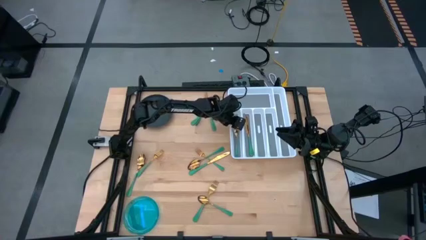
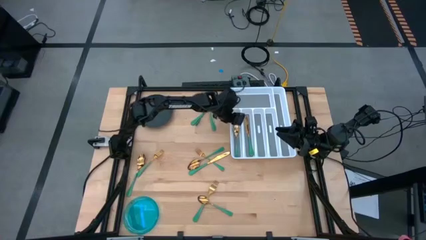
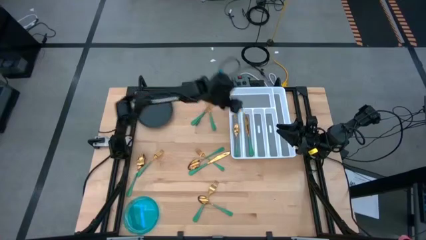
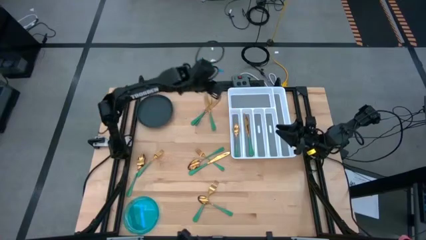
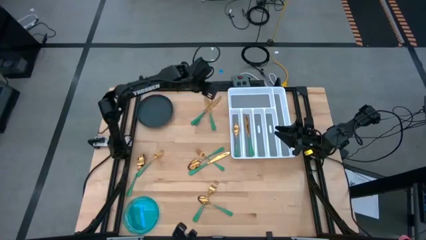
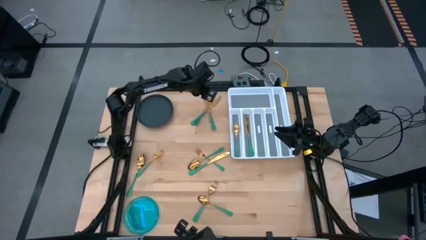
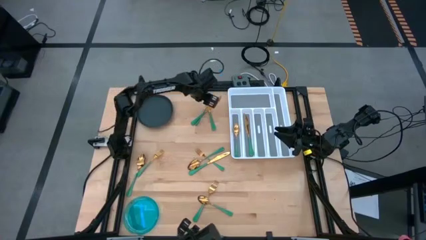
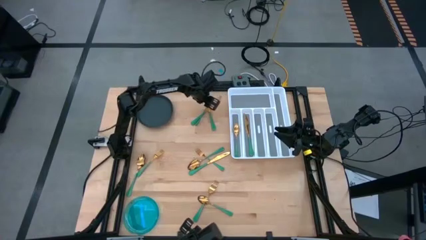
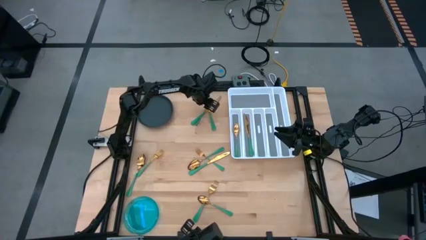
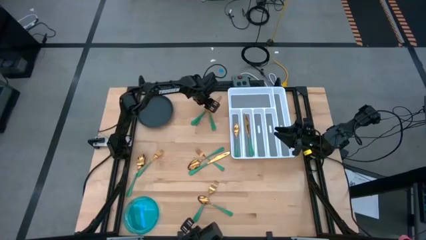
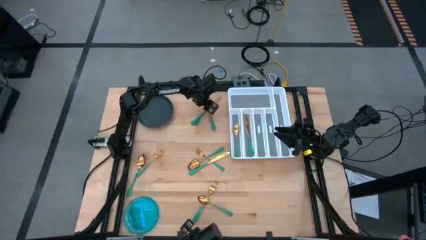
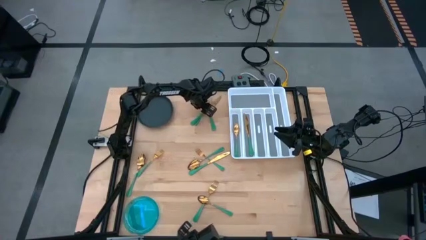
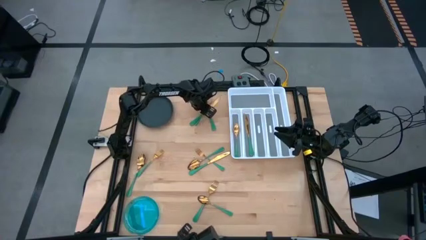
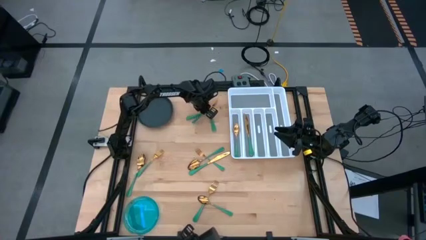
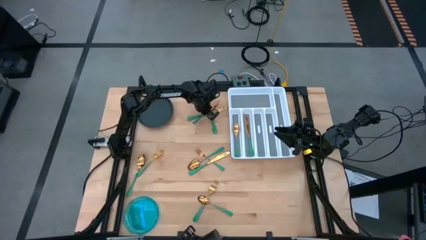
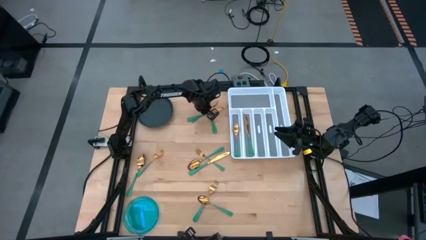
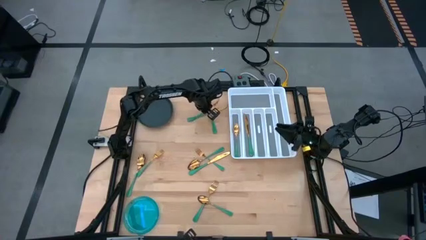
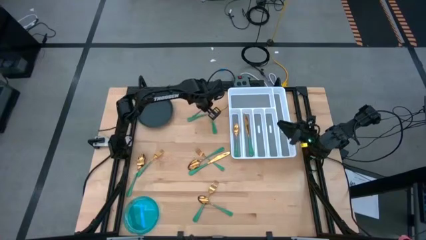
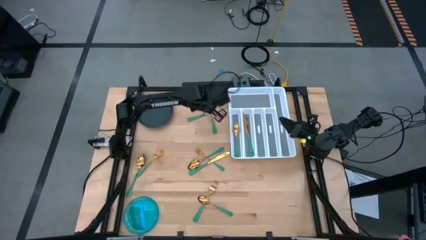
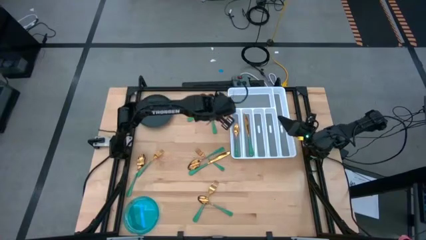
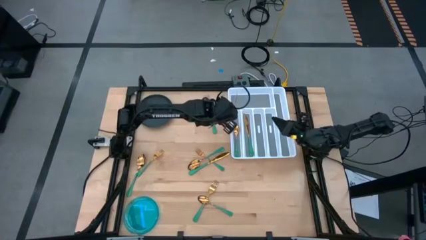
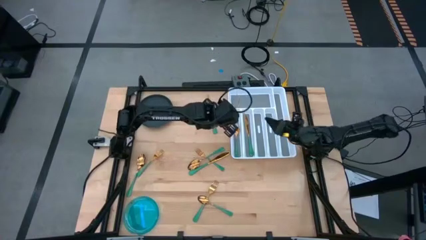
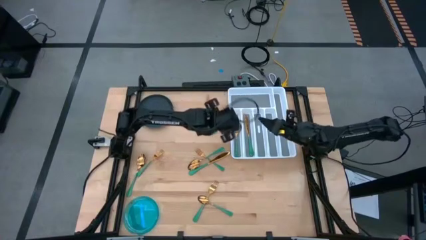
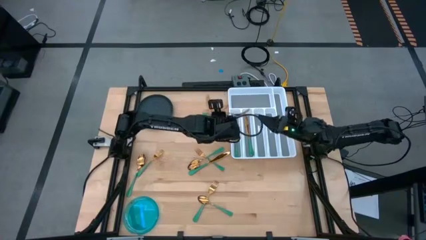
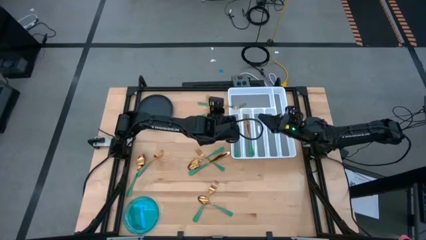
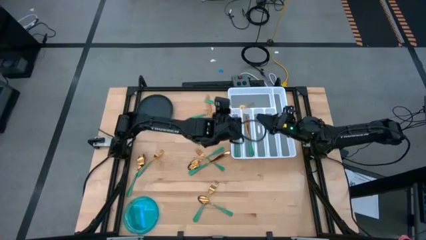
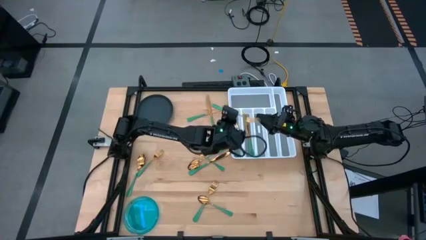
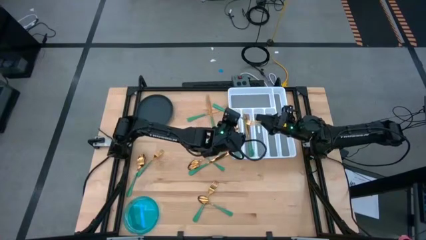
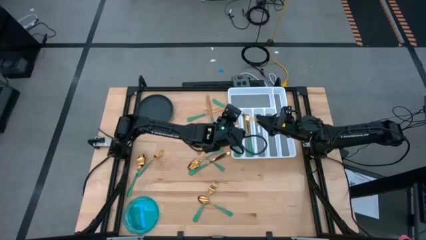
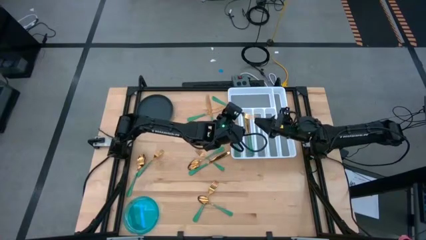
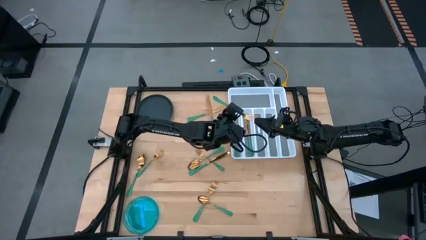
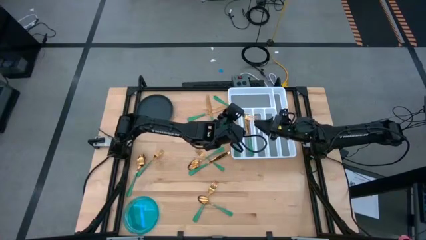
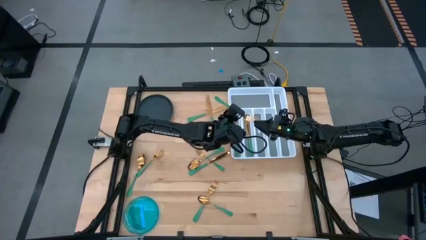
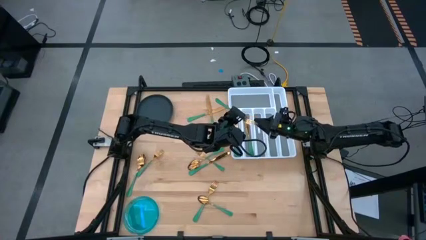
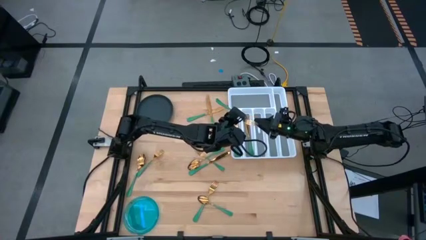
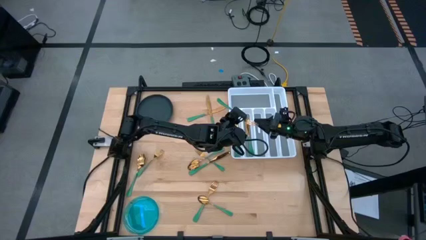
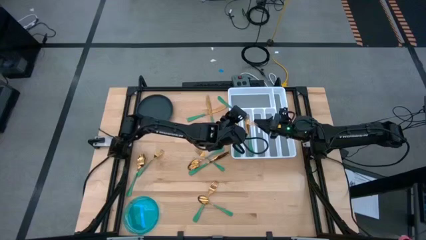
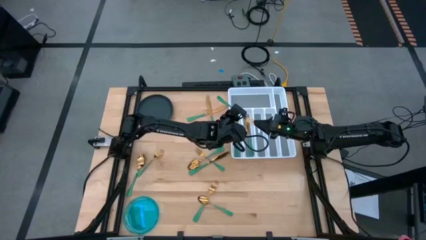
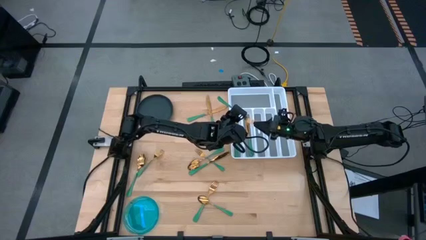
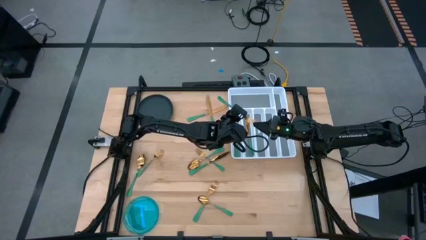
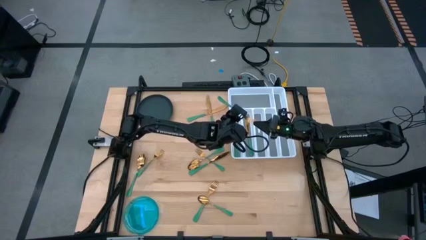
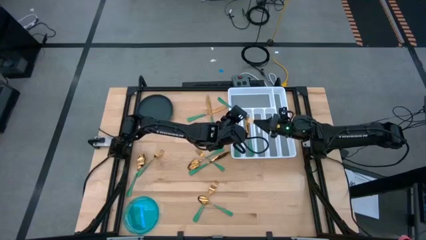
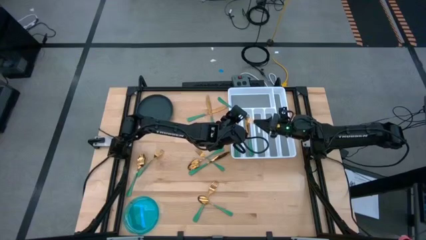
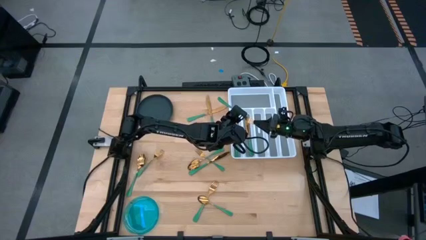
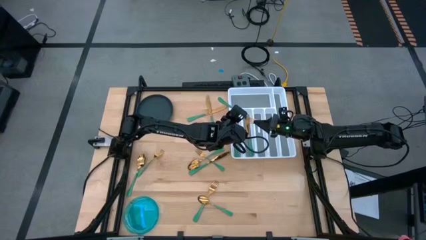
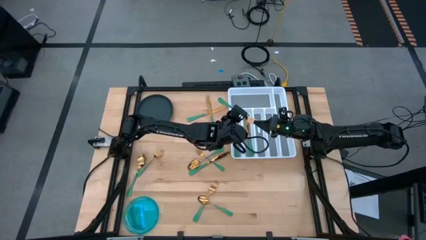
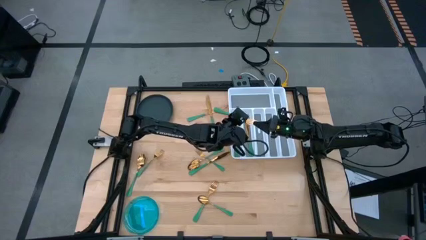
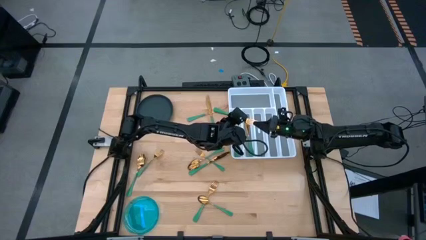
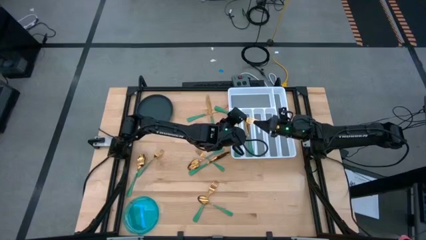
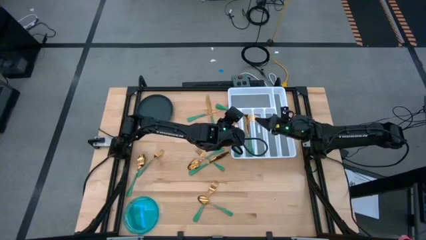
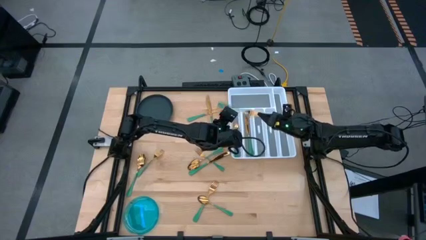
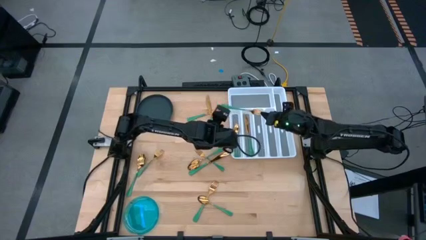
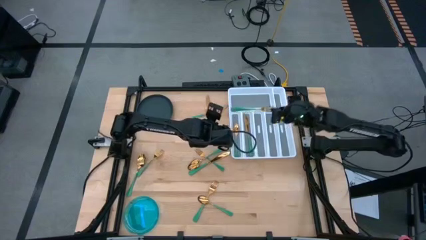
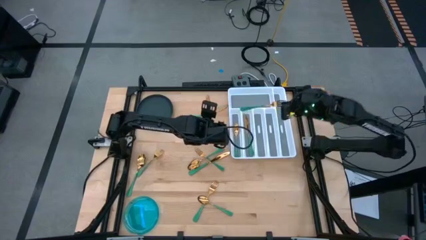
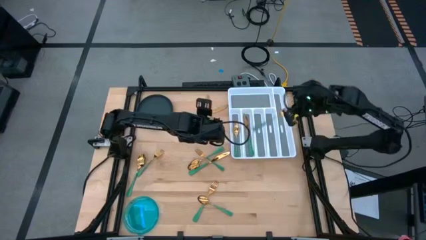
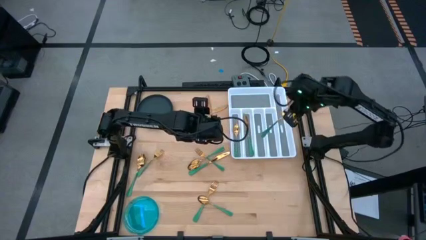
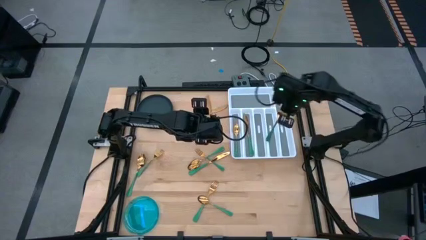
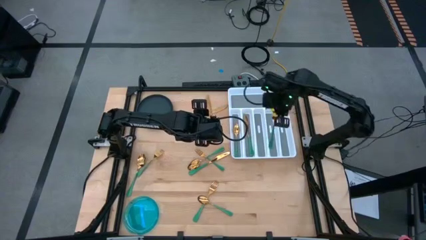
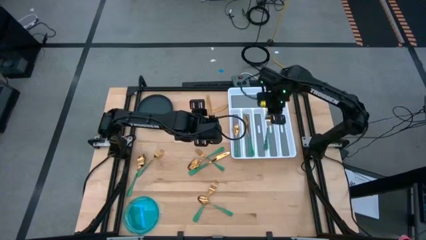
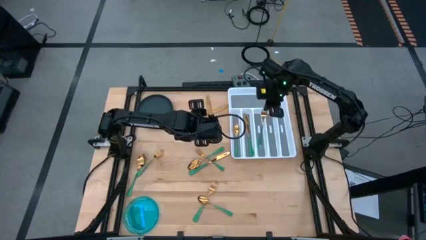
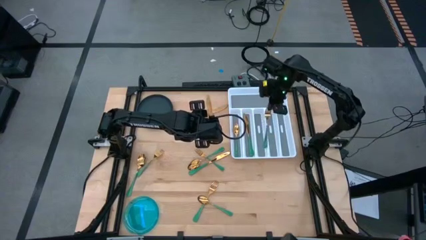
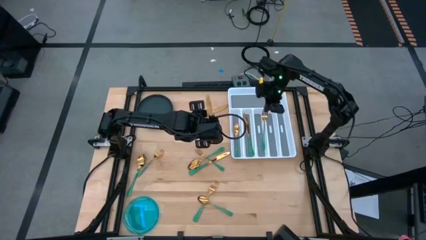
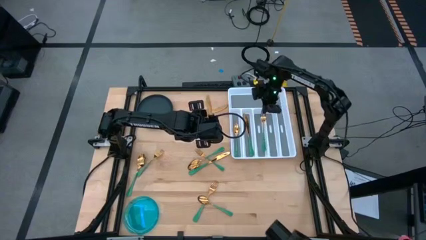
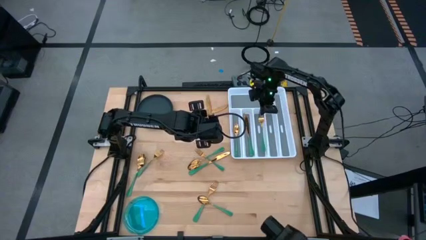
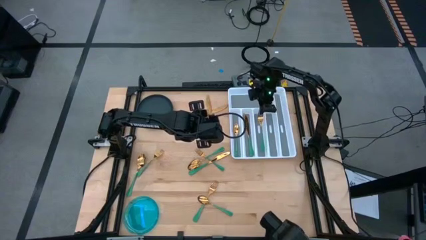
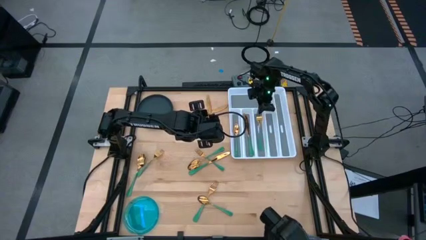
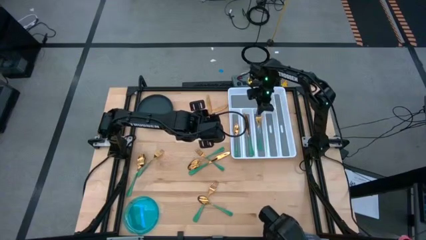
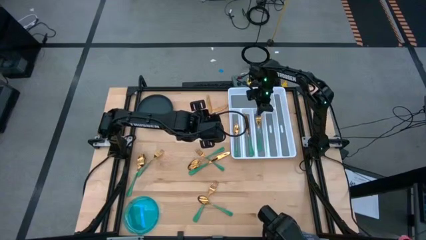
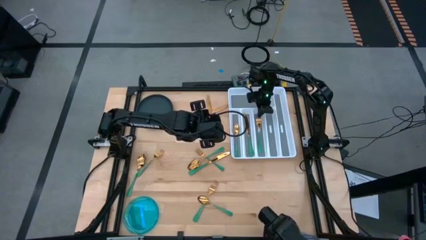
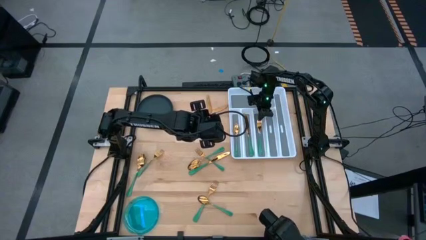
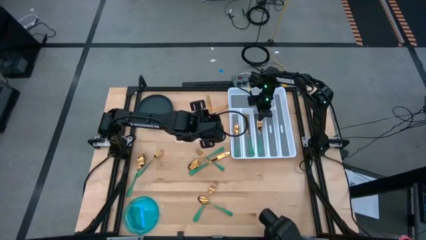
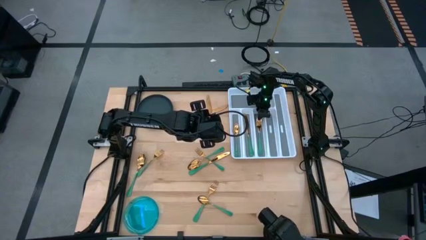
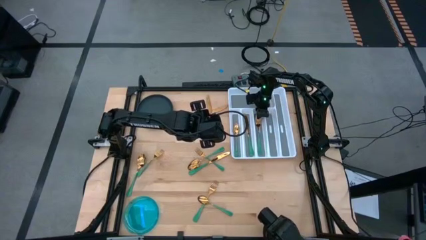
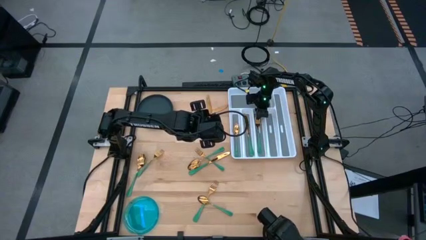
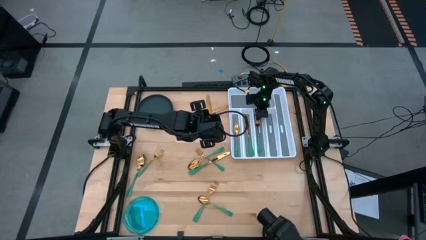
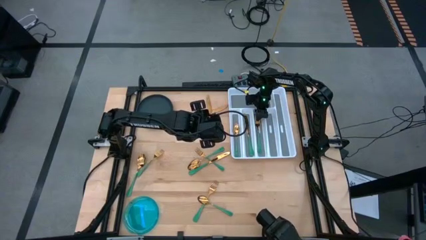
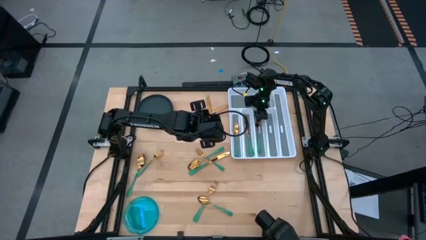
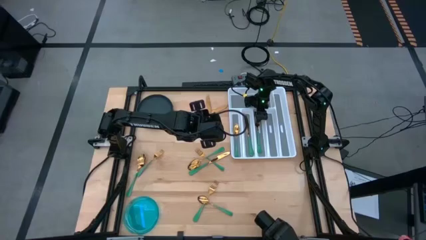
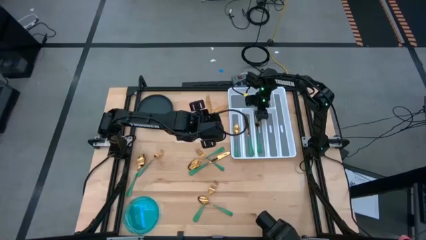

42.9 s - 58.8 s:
Task: Sort silverware
Put the green fork on the silverware organizer

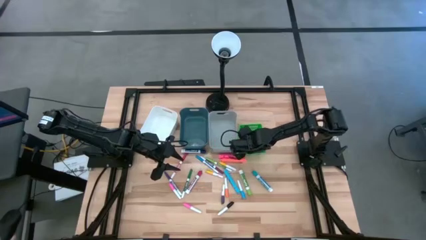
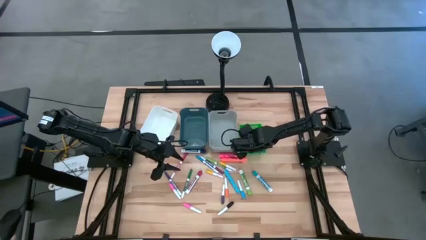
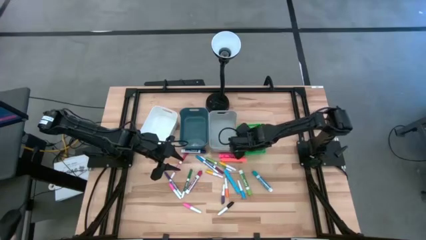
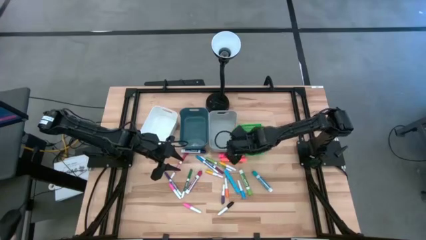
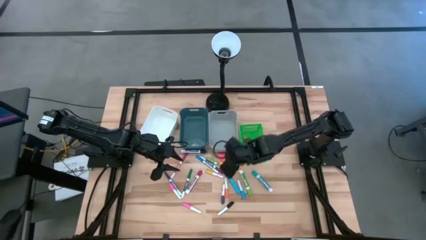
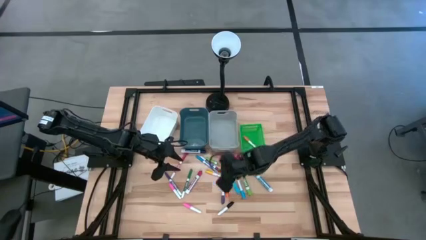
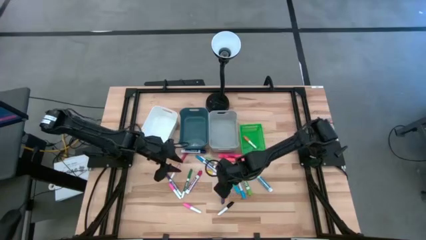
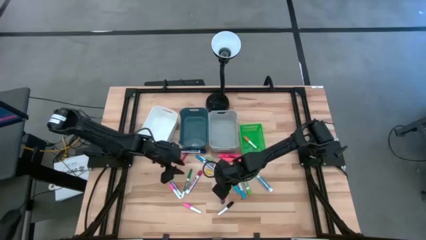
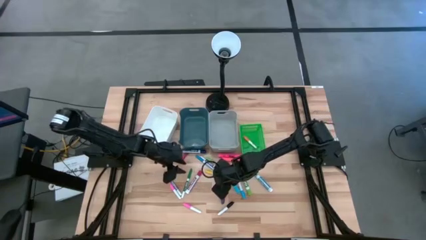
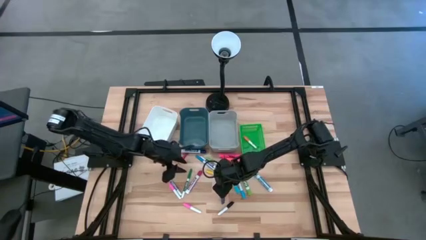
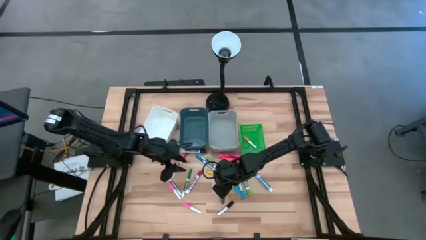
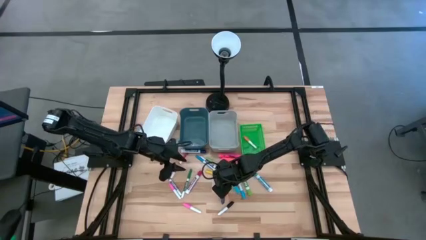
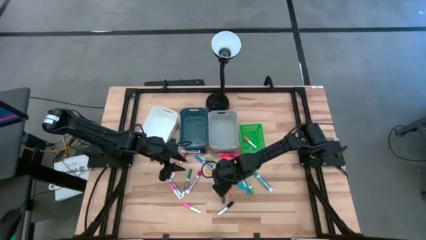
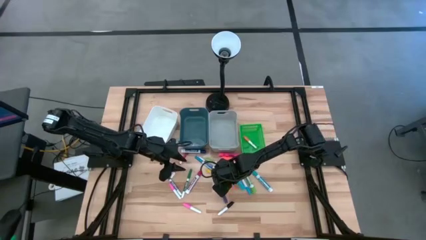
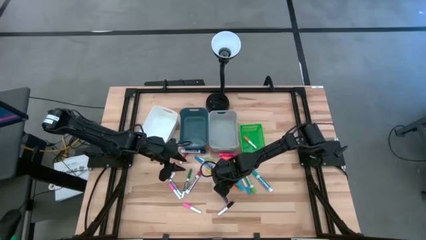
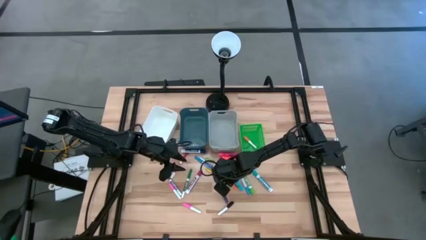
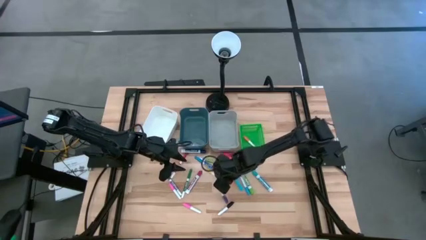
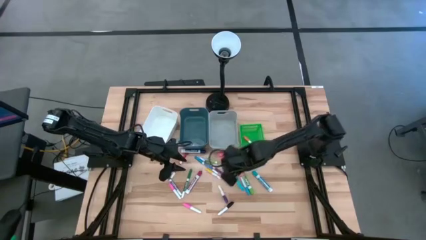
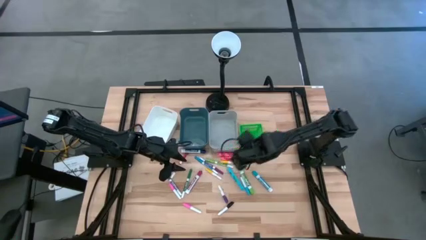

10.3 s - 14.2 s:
Task: Pick & Place Markers
Put the small orange highlighter pen into the green bin
